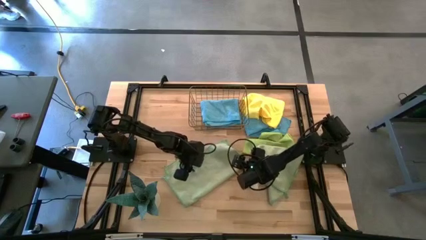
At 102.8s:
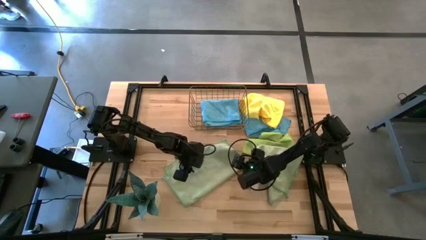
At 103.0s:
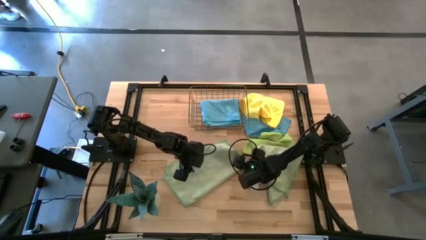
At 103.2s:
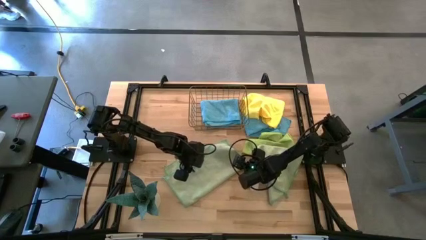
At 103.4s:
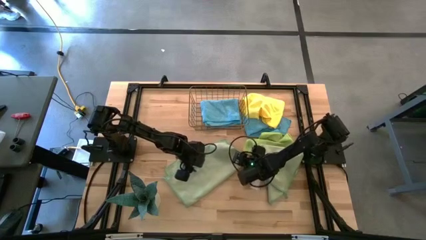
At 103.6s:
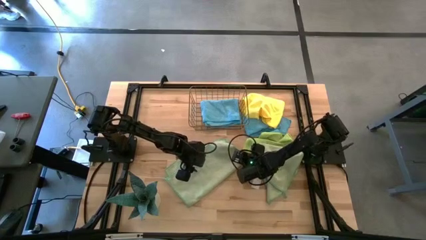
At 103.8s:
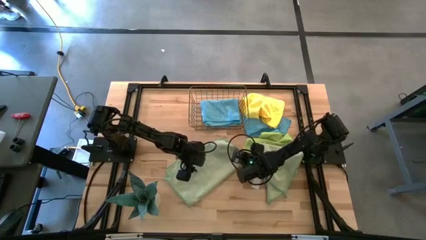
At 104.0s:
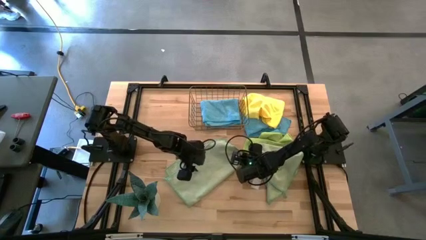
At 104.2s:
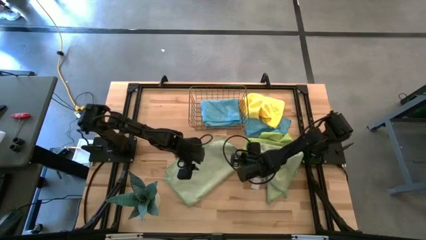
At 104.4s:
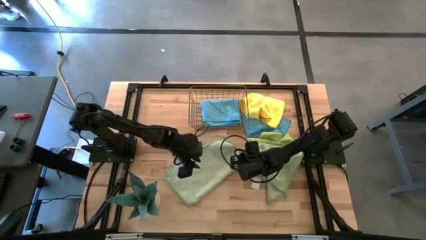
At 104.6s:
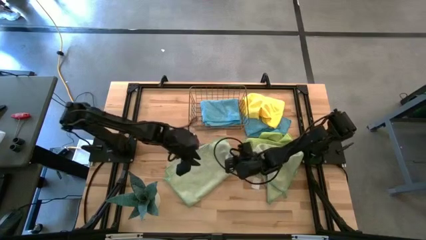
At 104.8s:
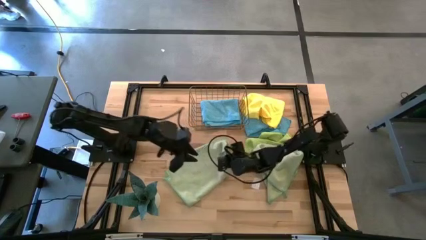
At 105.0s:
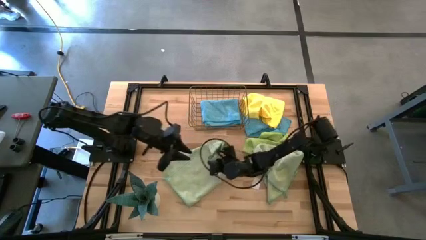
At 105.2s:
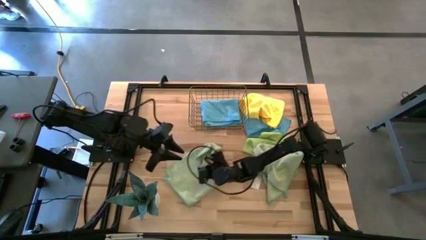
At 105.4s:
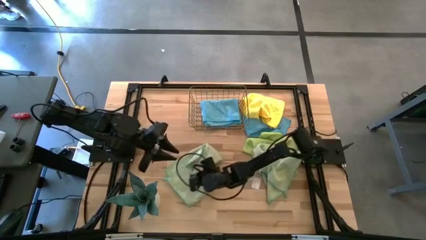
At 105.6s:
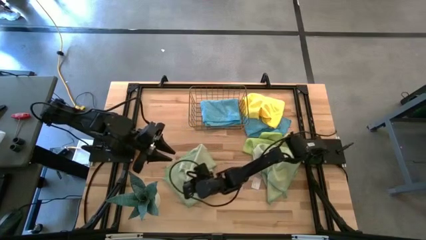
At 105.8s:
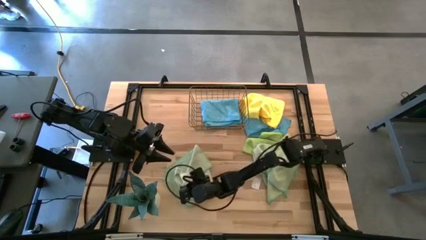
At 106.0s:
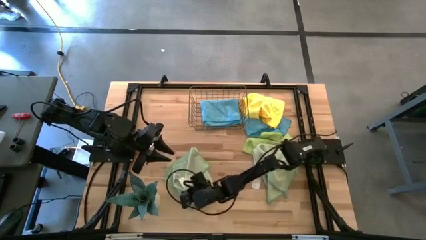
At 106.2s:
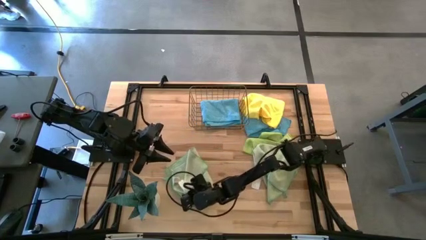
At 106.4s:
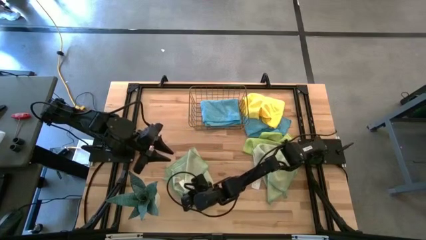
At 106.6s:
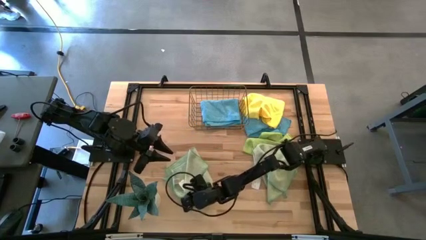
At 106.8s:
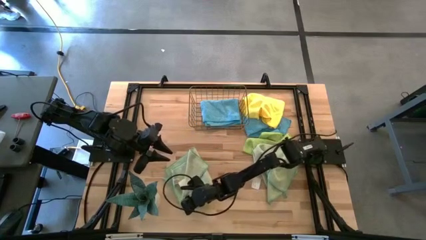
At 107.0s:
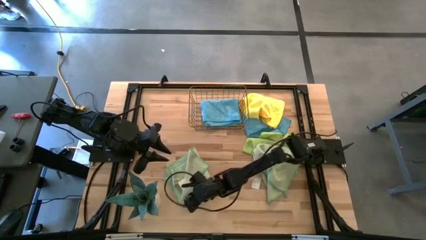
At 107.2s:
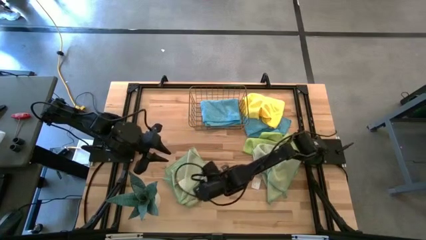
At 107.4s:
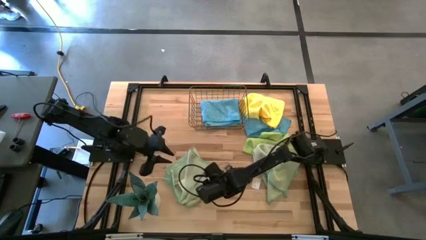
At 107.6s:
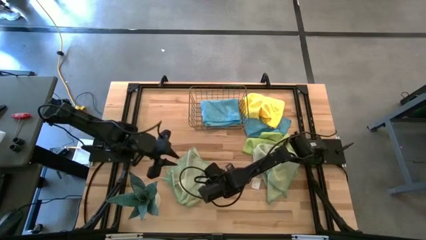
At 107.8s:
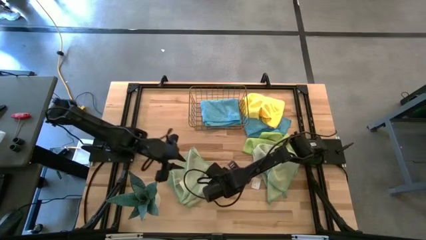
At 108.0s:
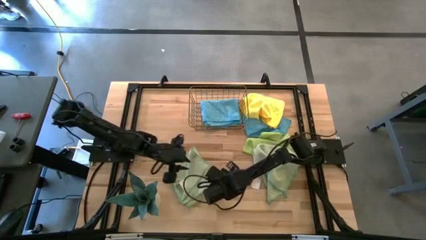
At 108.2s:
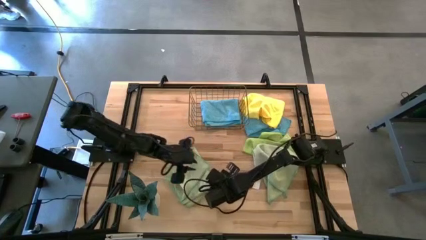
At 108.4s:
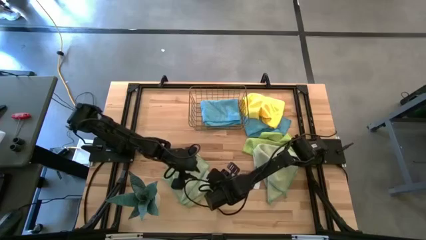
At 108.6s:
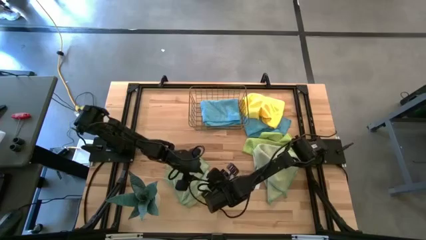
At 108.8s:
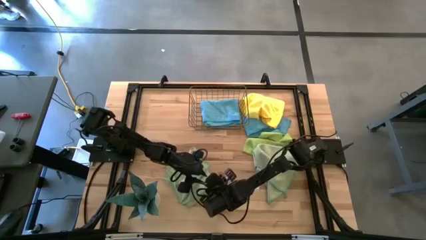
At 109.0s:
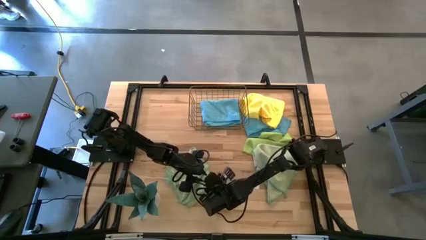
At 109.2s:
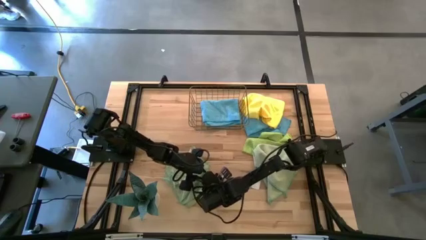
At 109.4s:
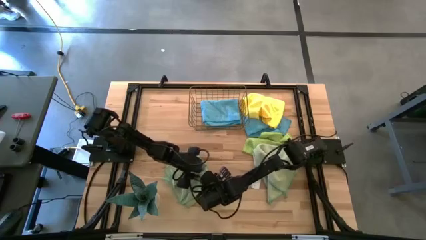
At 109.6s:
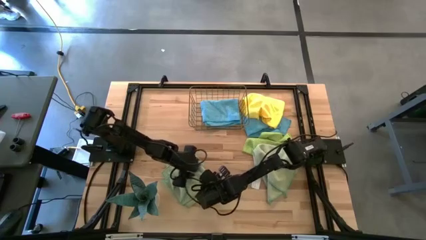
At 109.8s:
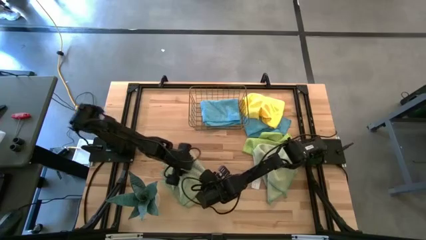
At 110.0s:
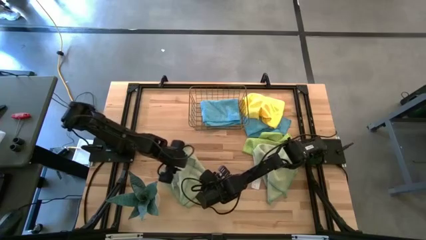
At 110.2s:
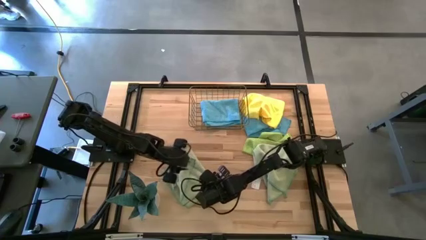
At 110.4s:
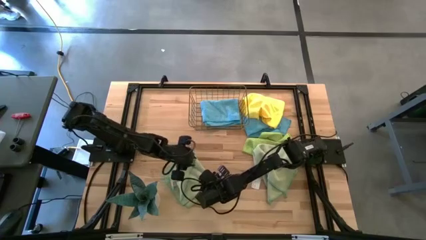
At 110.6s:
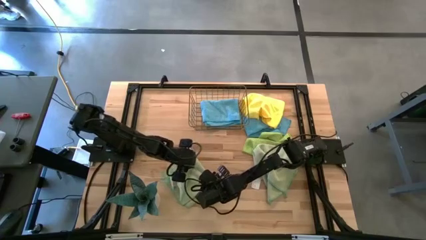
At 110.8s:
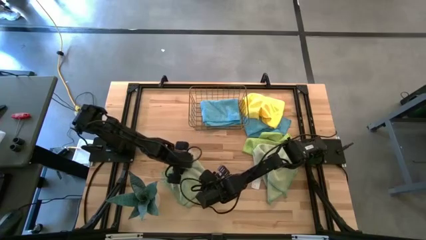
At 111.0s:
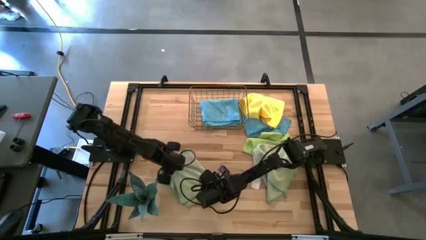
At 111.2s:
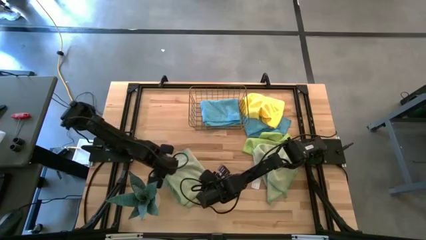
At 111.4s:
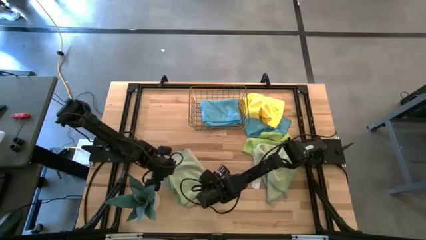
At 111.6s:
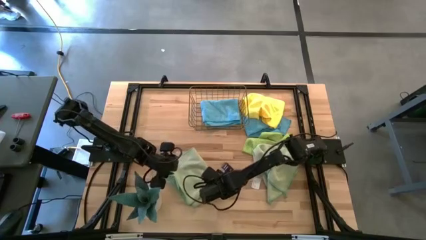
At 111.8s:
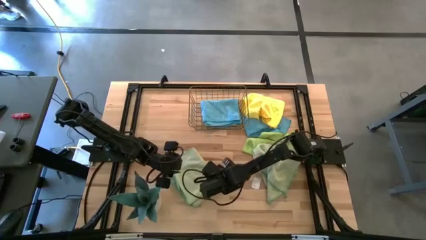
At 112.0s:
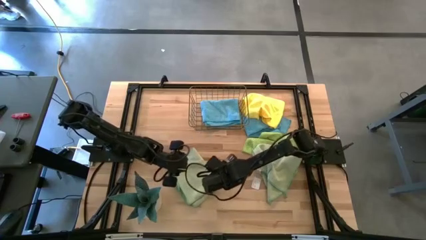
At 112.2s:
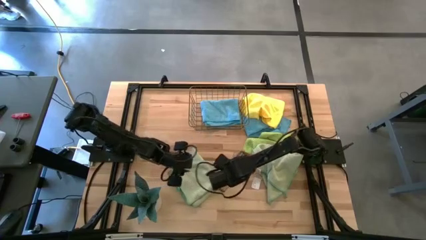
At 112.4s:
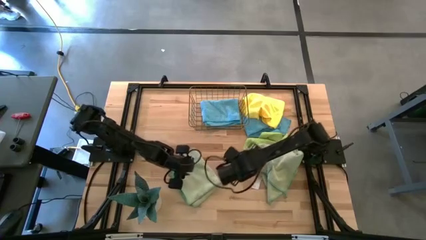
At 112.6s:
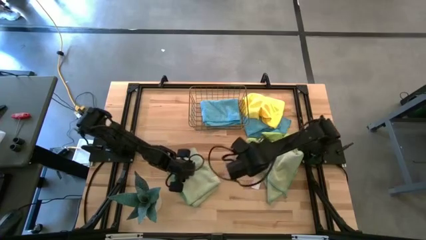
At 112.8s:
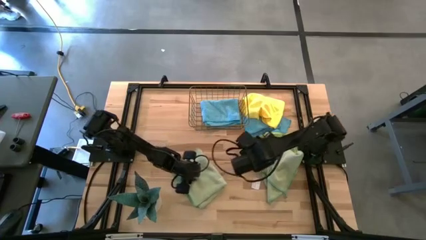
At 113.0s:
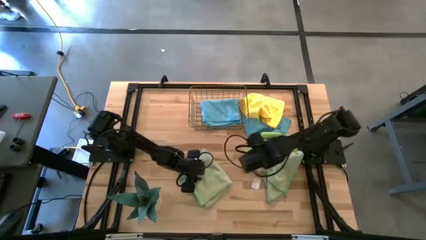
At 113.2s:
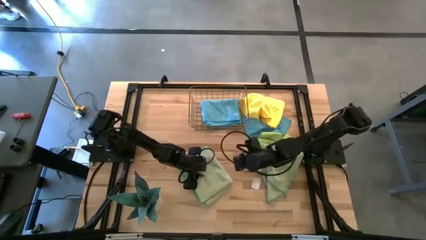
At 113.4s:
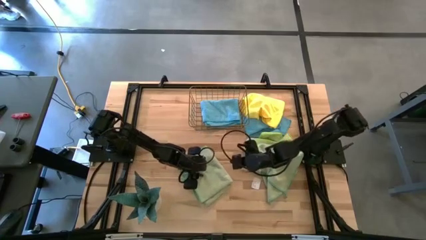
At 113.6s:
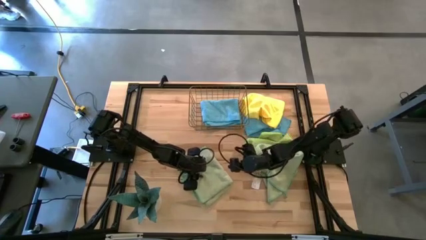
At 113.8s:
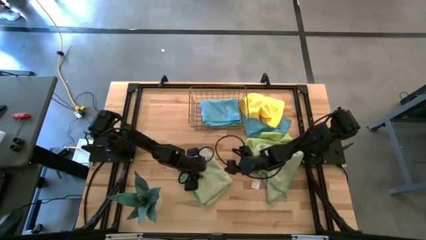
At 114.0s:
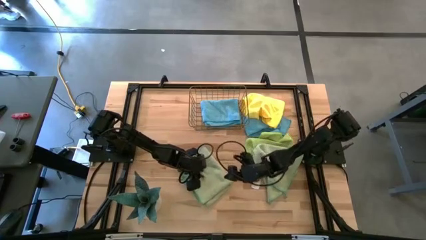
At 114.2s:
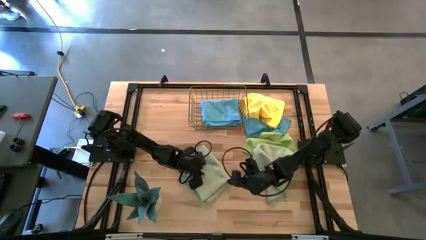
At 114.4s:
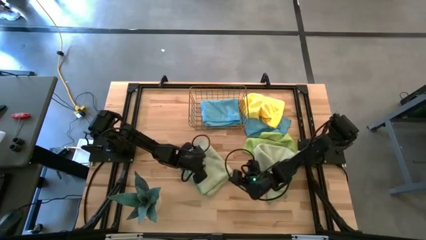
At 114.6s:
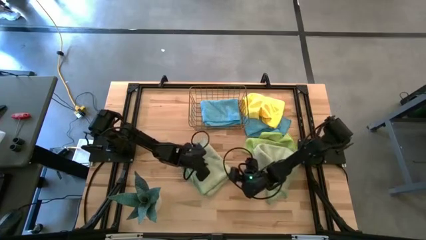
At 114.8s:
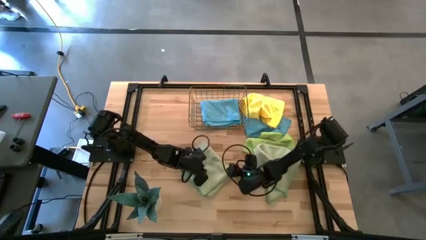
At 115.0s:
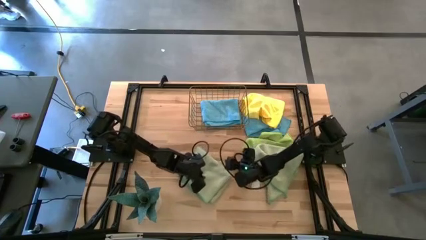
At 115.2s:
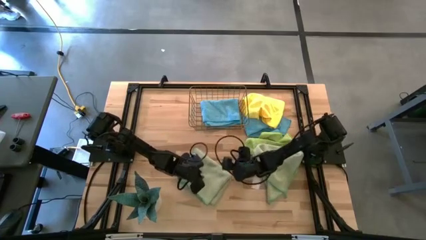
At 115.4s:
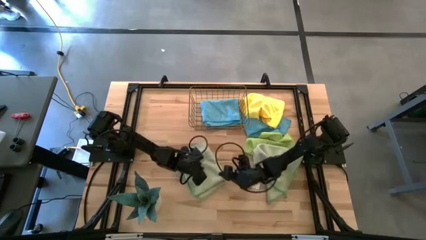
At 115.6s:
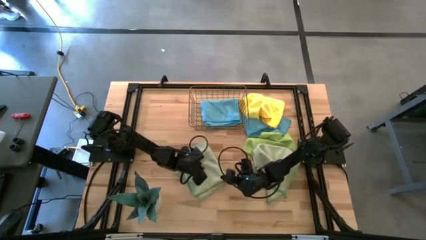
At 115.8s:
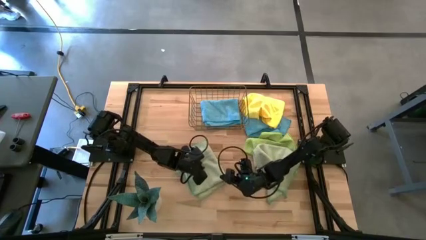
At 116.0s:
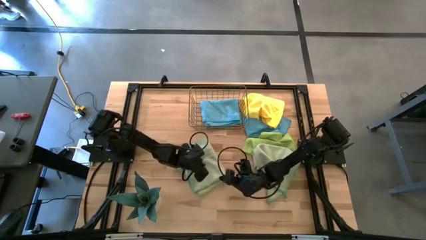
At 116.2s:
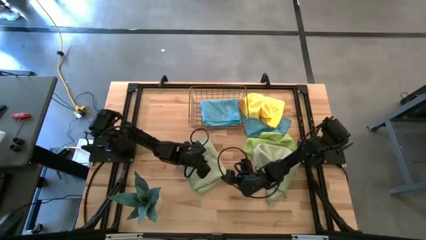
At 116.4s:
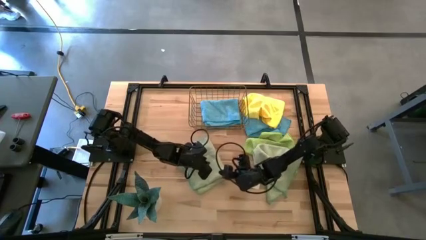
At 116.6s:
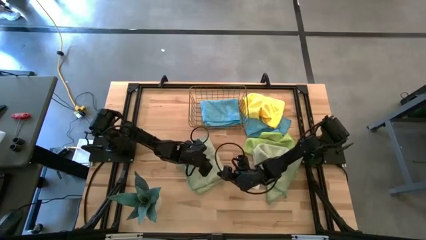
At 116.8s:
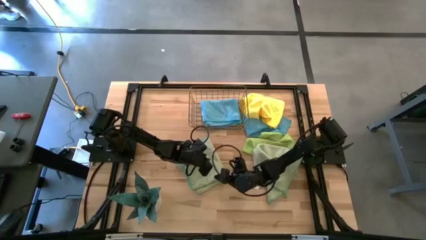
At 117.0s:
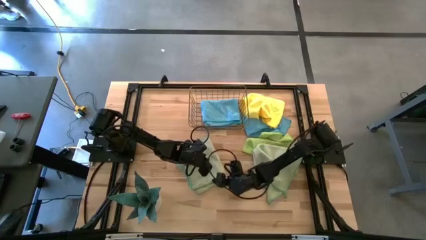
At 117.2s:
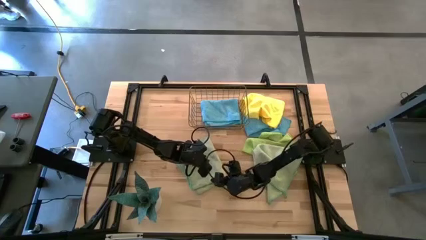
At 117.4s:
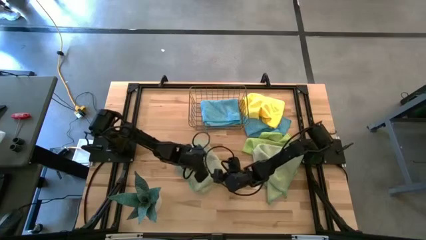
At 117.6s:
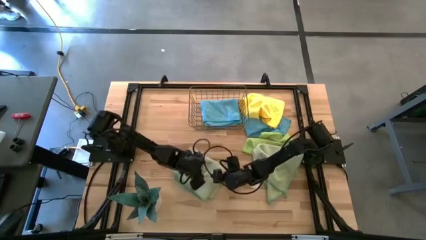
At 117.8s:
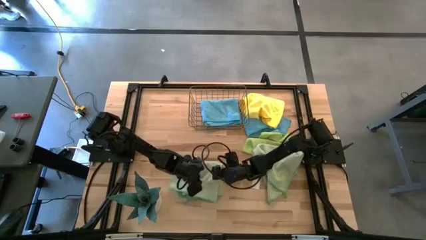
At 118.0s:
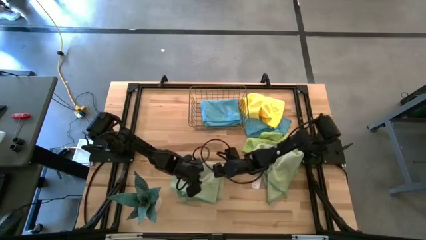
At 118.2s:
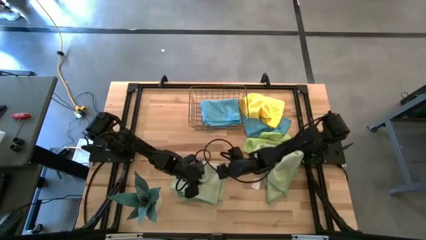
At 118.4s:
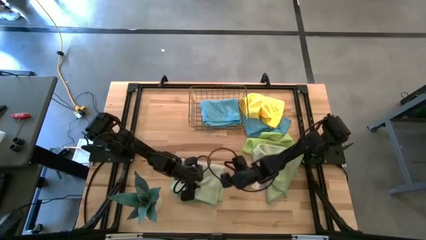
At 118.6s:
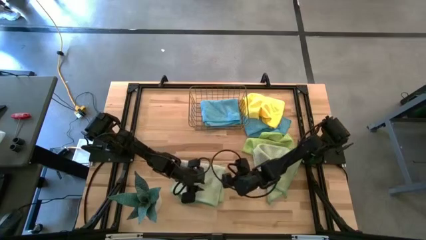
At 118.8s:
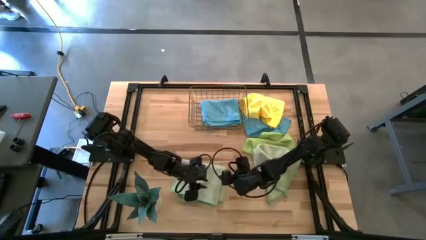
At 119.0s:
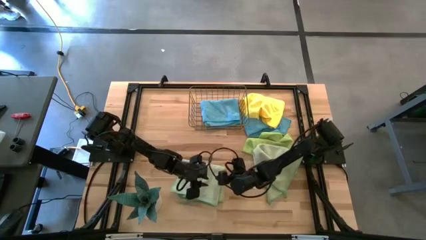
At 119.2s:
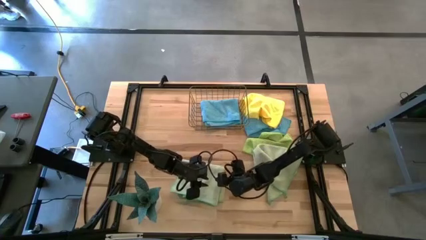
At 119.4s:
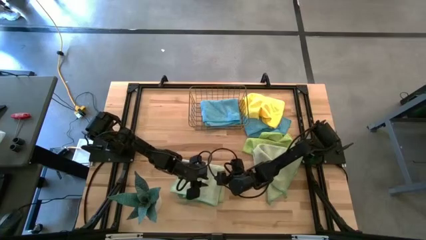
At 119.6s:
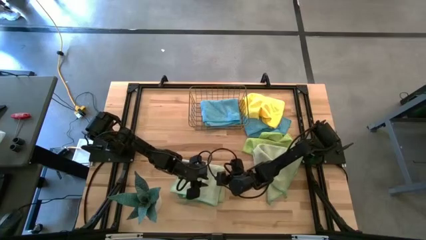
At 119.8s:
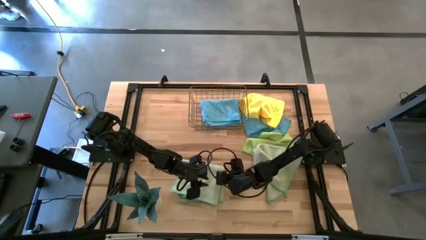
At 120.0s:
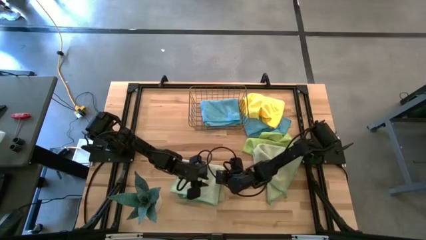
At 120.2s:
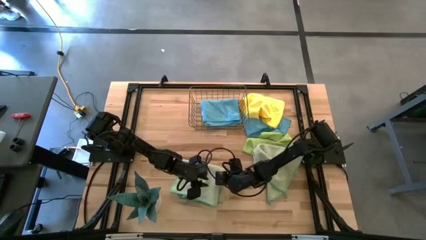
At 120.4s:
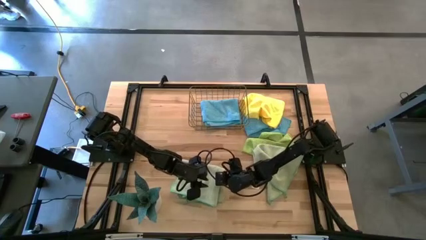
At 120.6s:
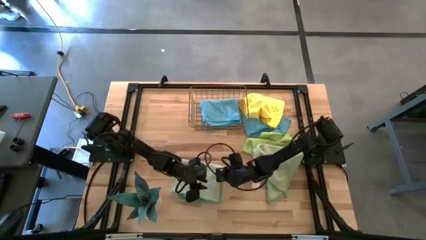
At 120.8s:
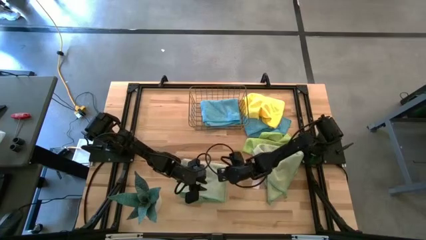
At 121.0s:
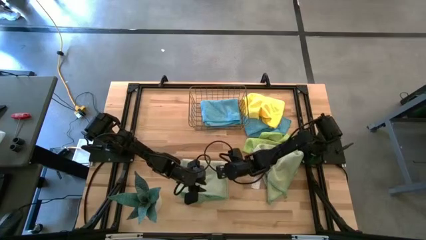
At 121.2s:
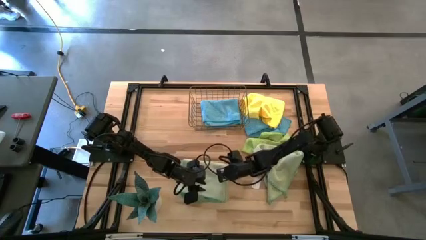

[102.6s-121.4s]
Task: Fold microfiber towels
Fold the left light green towel
